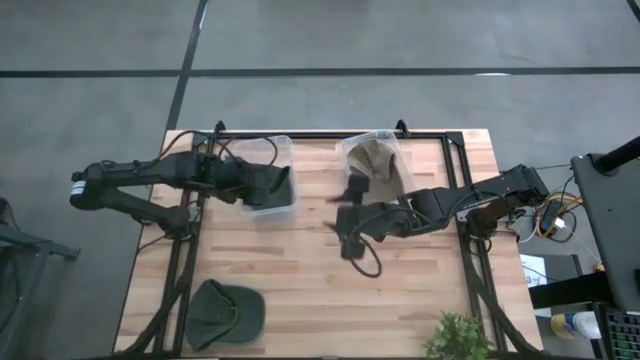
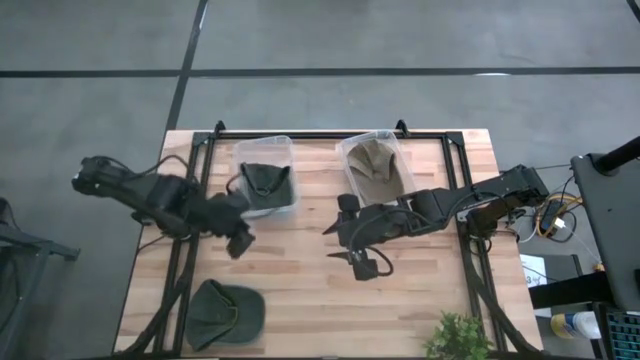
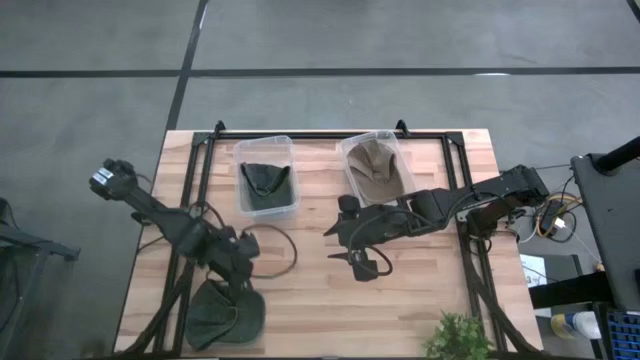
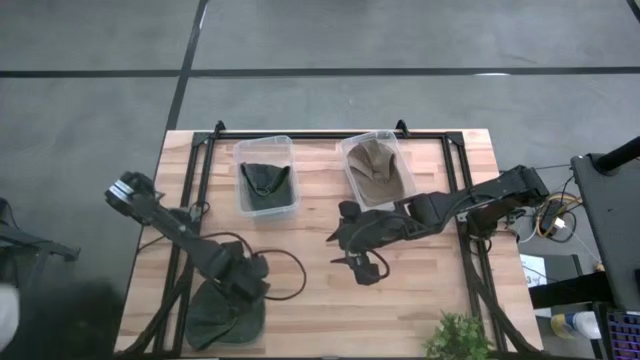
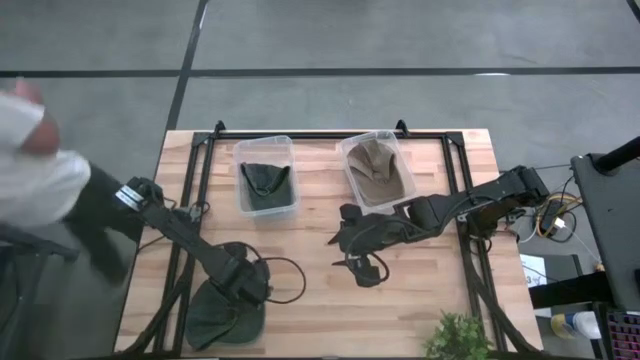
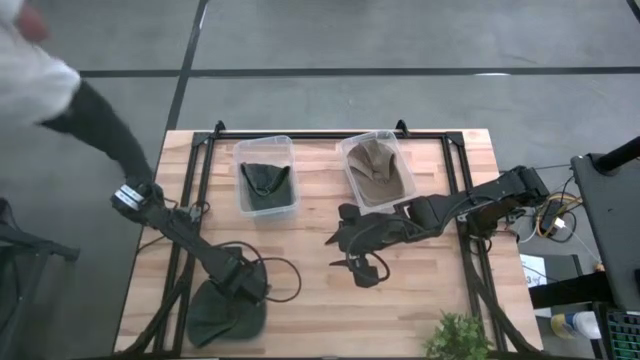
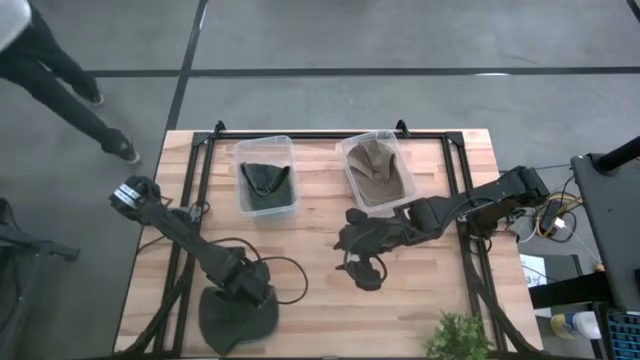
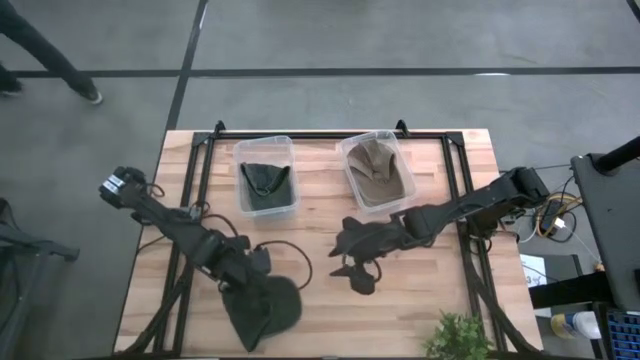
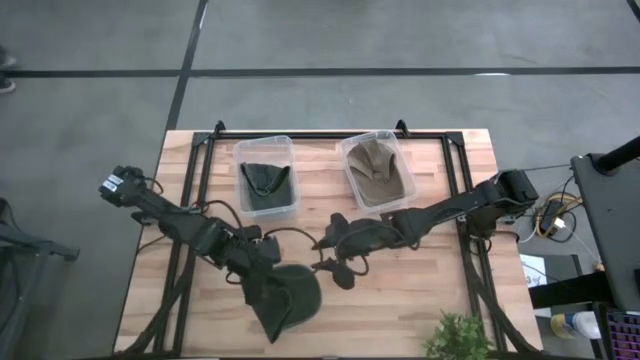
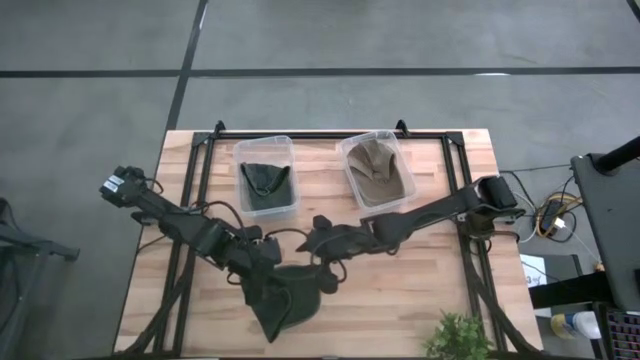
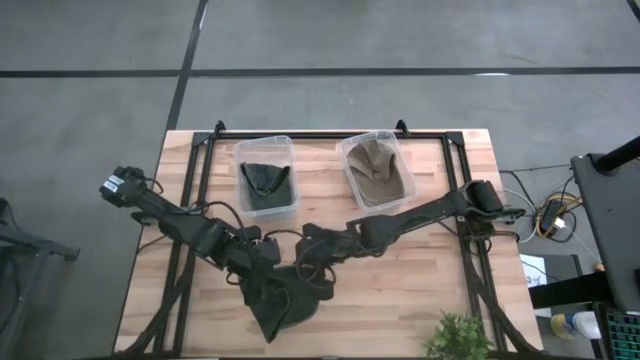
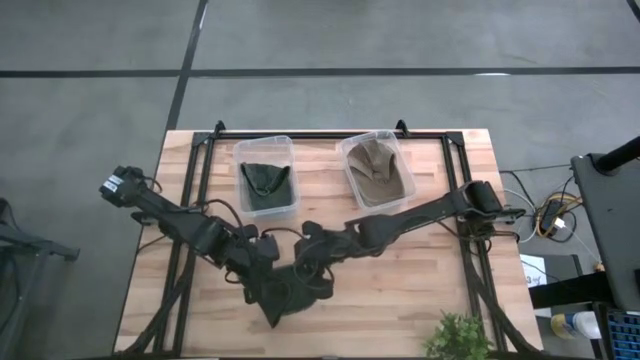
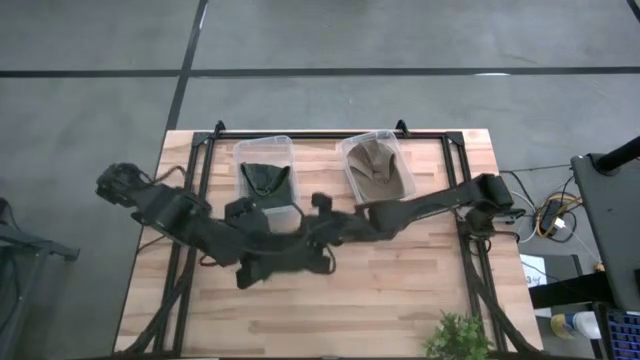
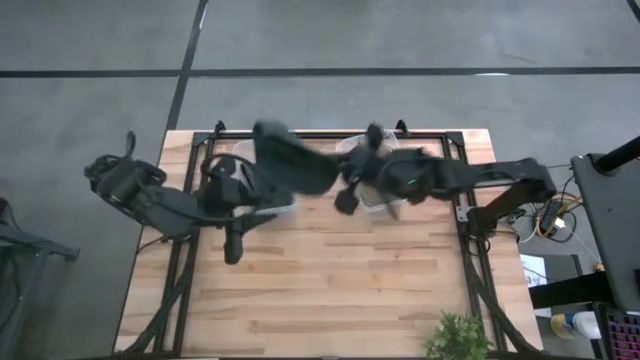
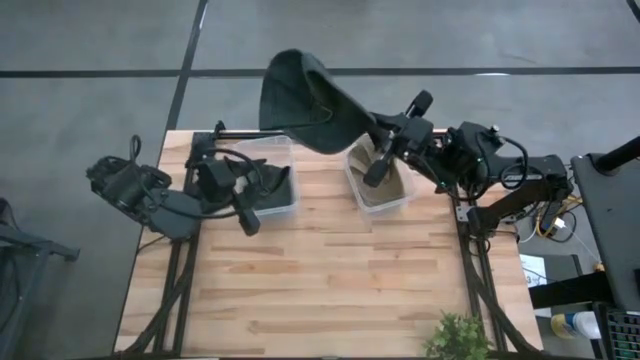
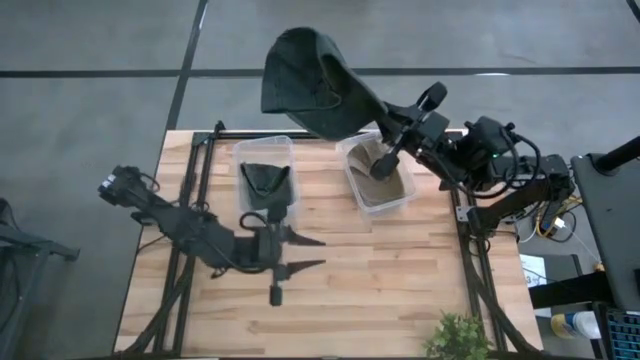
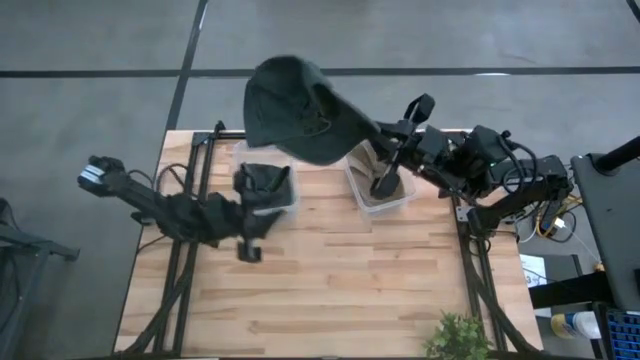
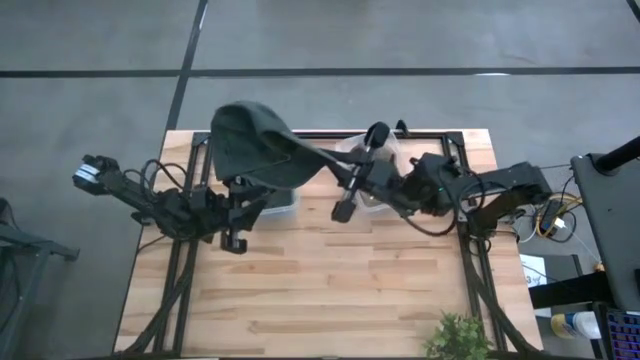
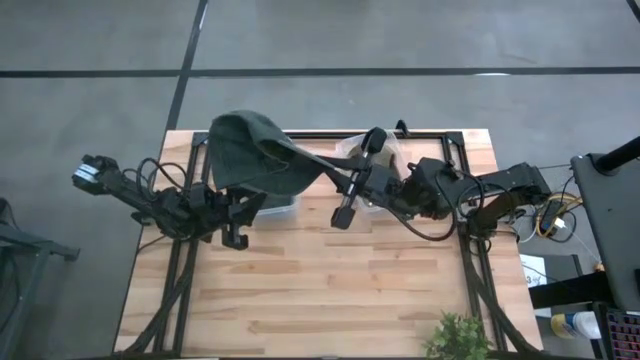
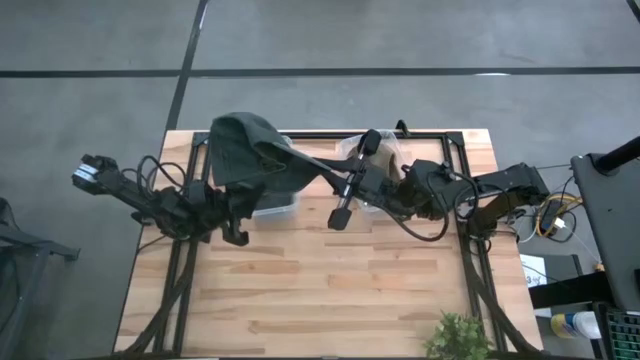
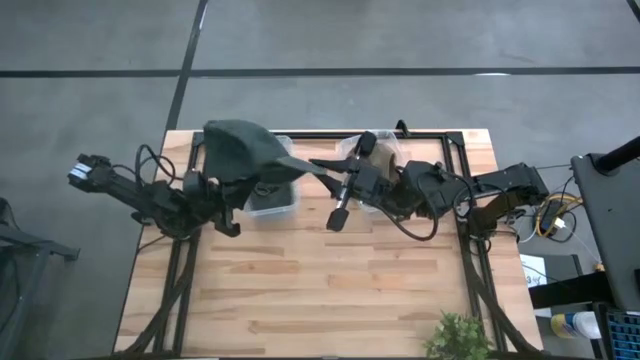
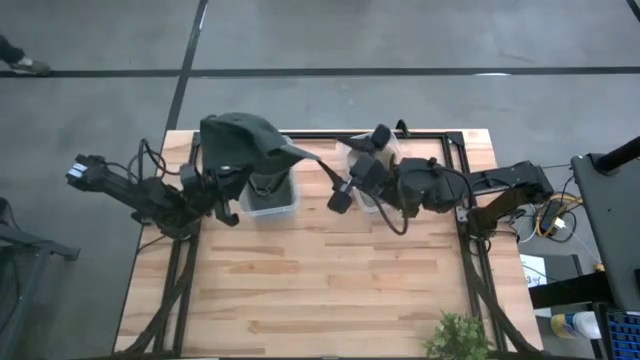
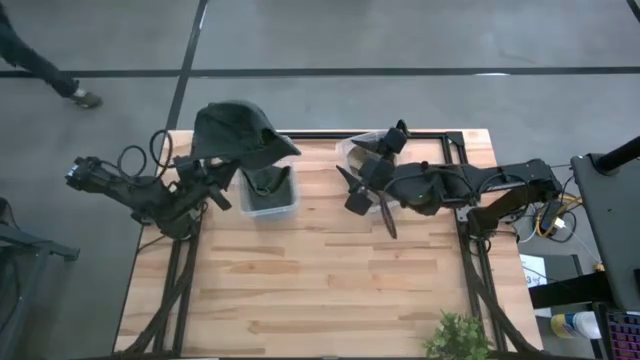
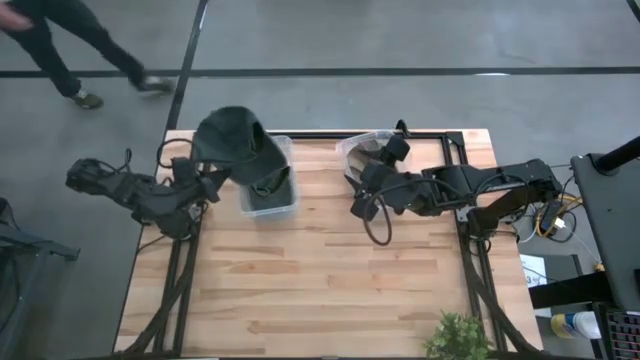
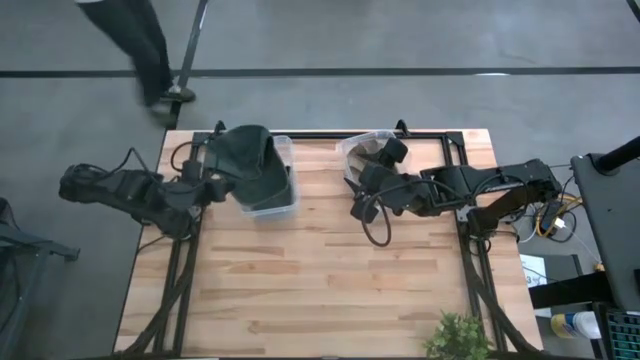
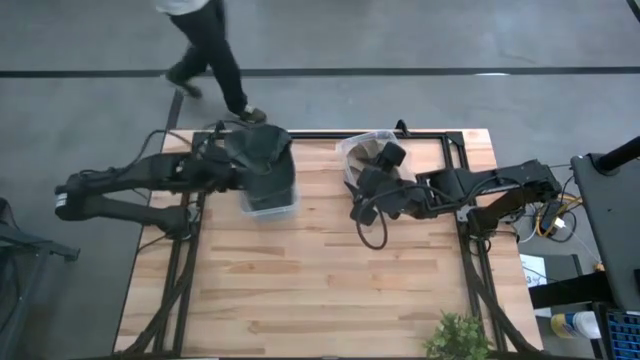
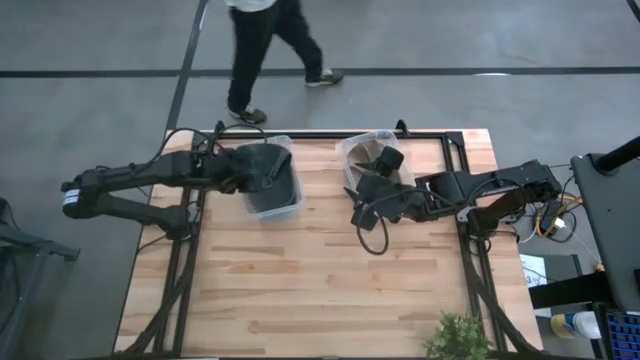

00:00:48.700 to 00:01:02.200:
Task: Pick & Place hat
Put the black cap into the left transparent bin

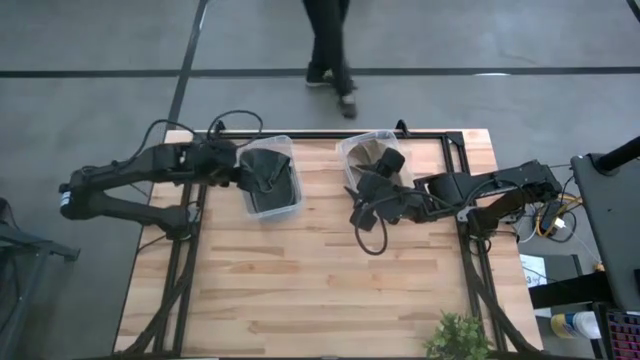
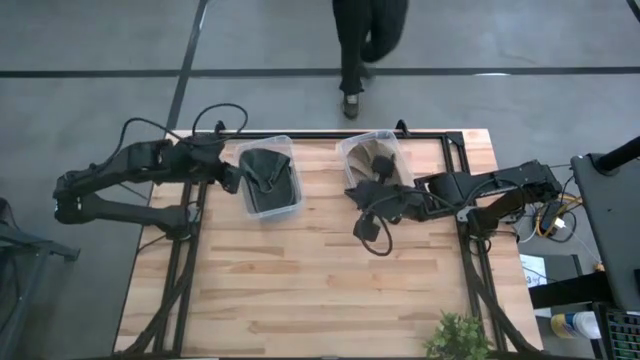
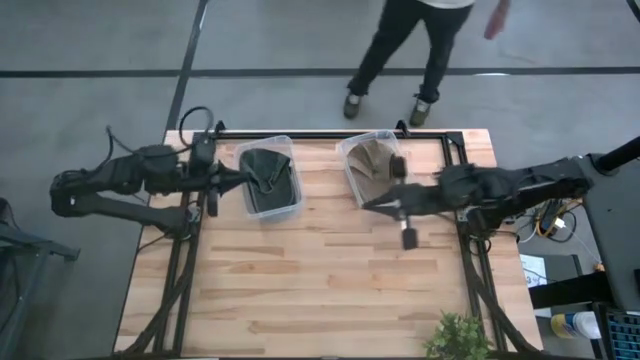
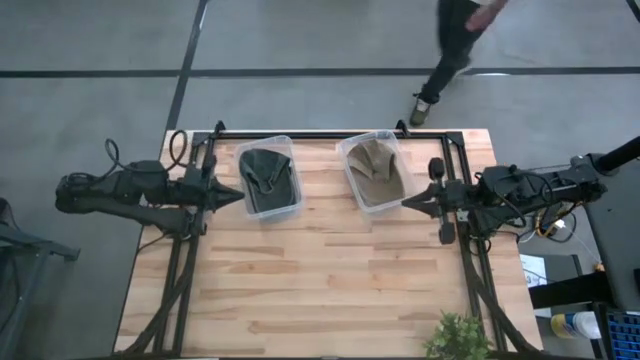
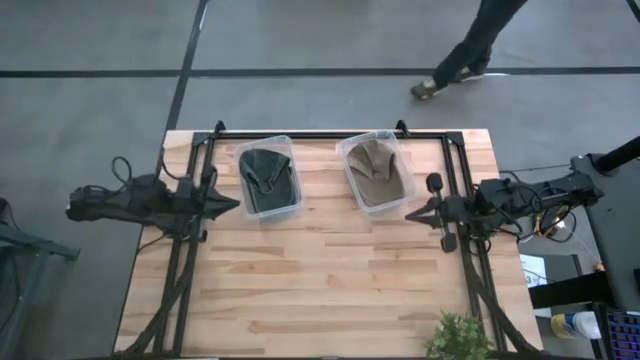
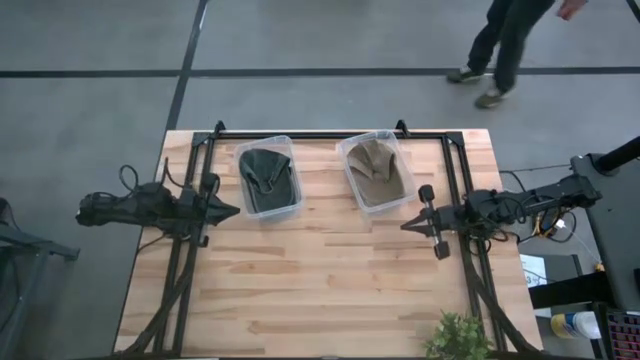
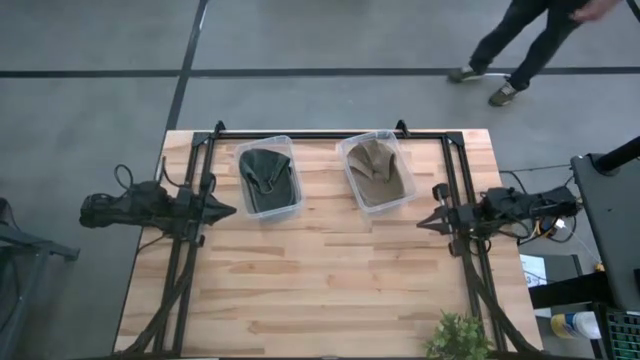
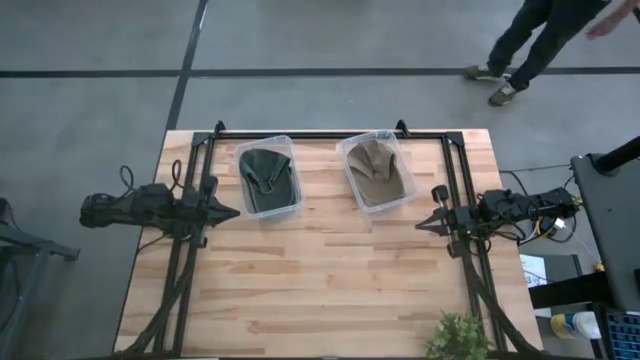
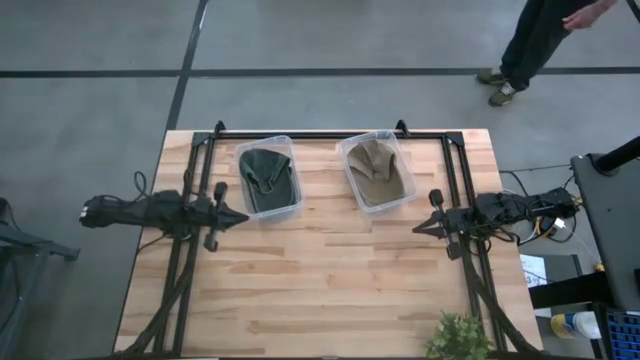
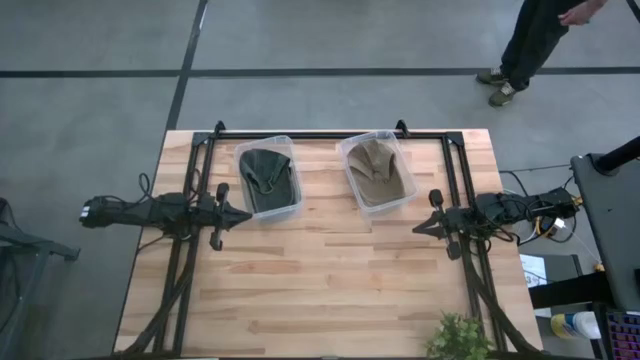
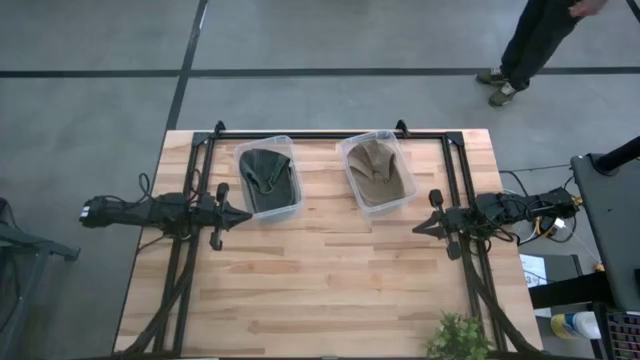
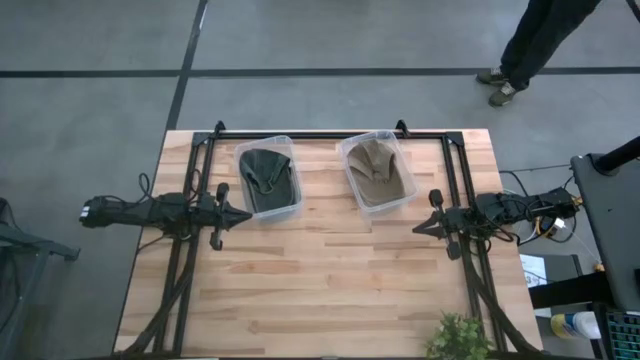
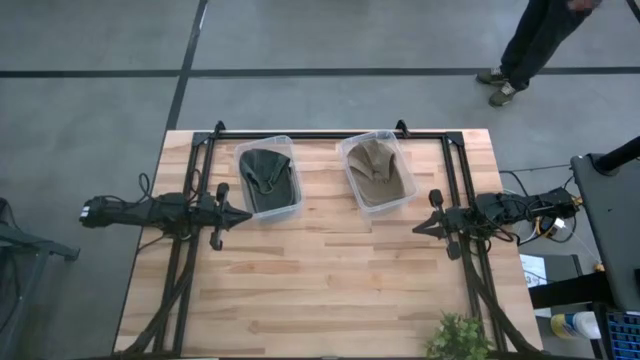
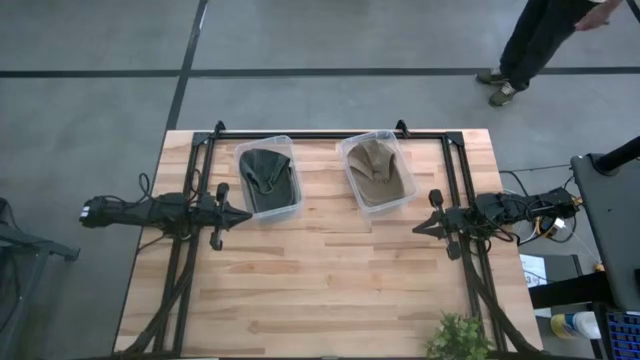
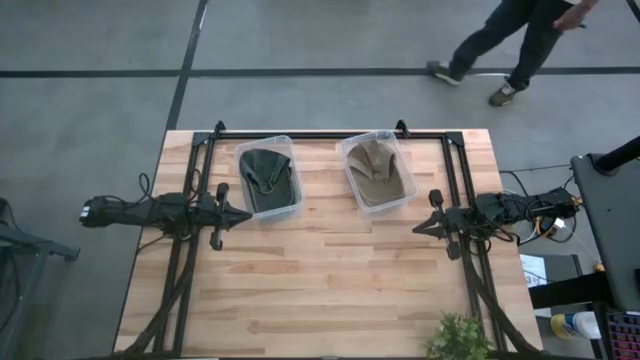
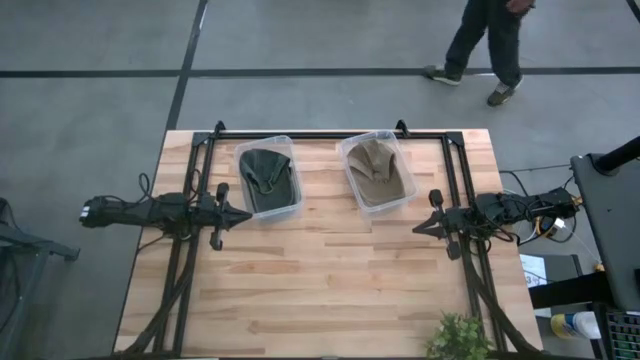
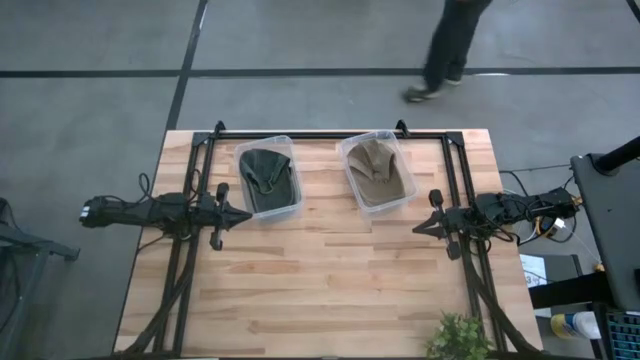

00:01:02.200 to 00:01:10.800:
Return to Home Position
